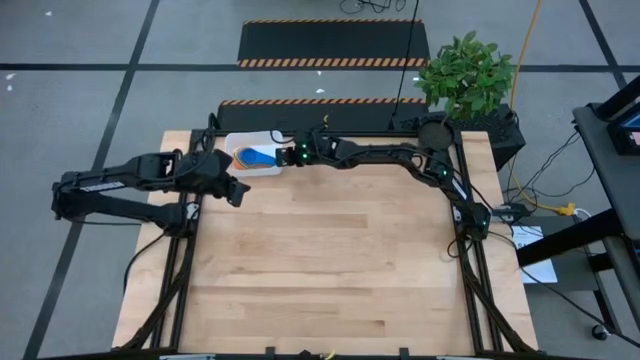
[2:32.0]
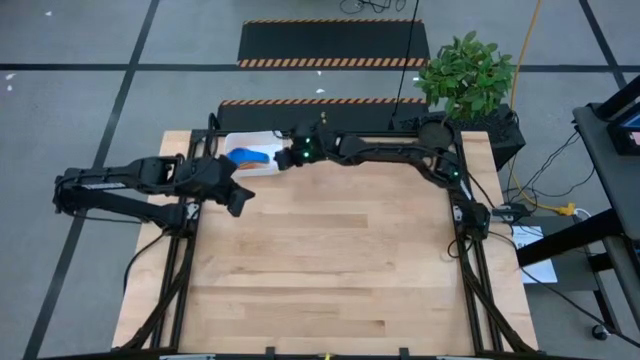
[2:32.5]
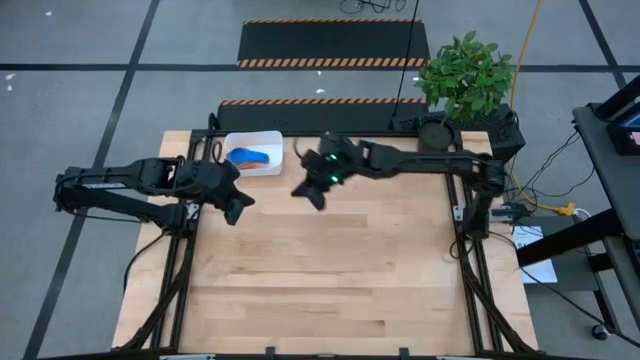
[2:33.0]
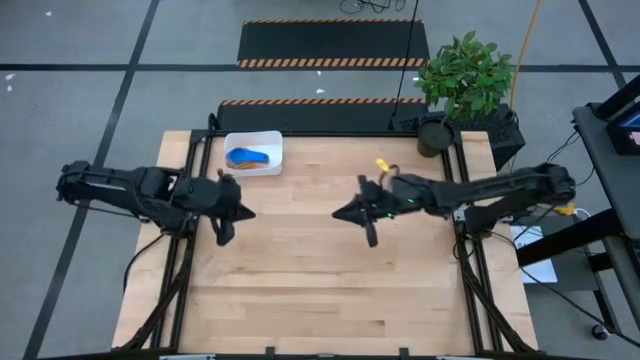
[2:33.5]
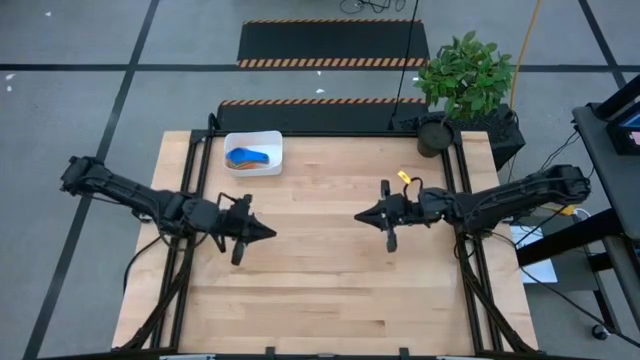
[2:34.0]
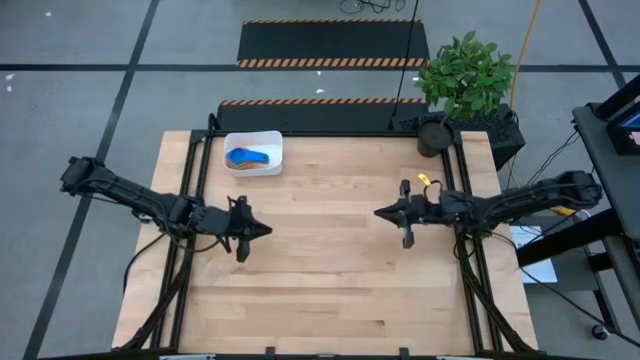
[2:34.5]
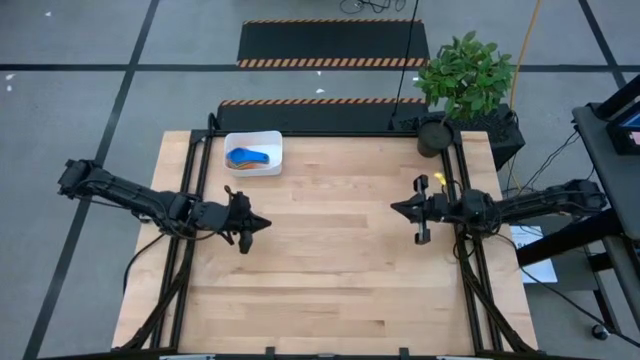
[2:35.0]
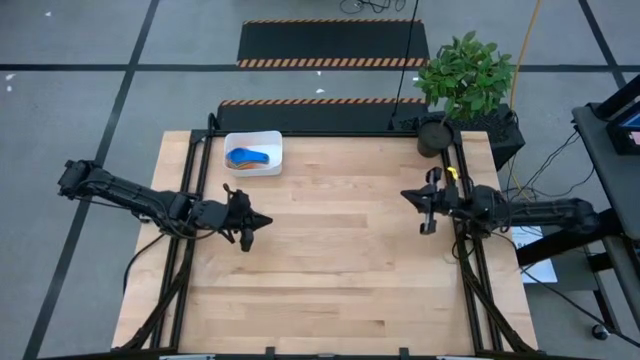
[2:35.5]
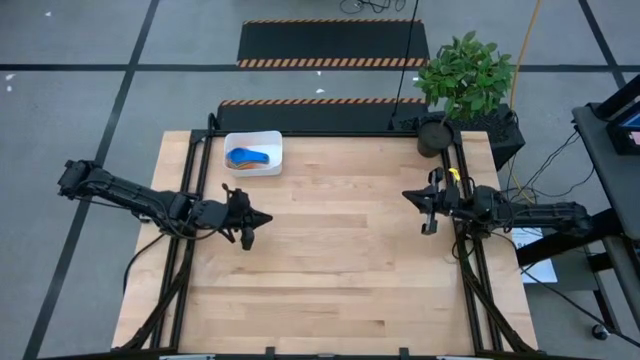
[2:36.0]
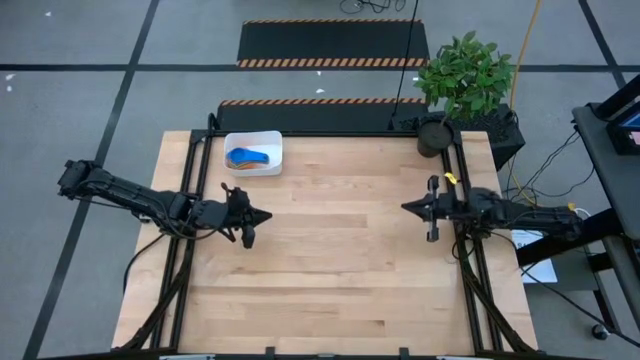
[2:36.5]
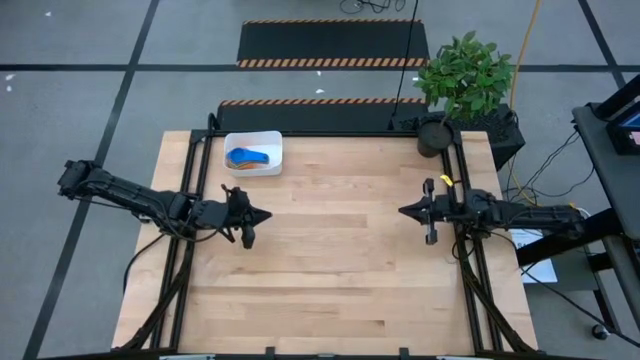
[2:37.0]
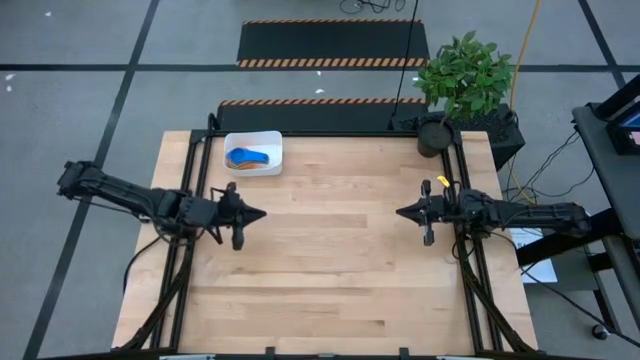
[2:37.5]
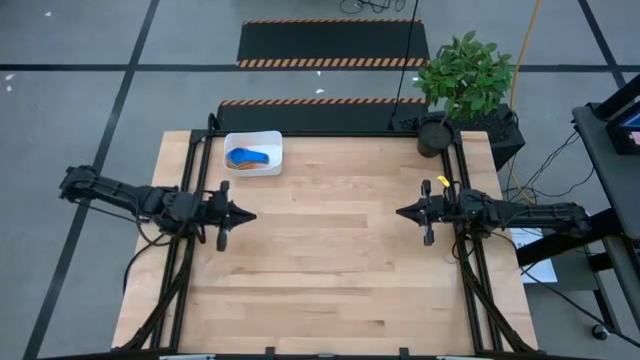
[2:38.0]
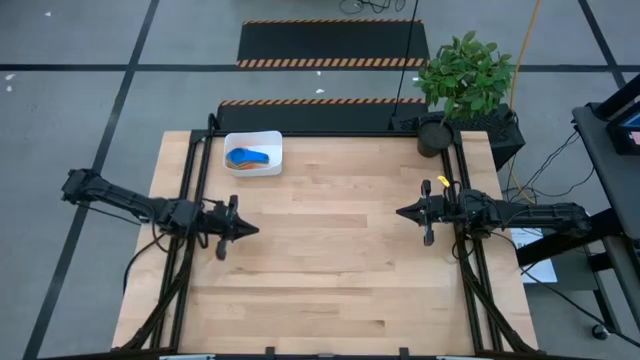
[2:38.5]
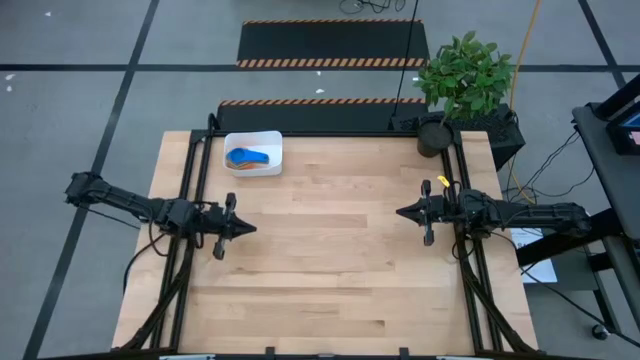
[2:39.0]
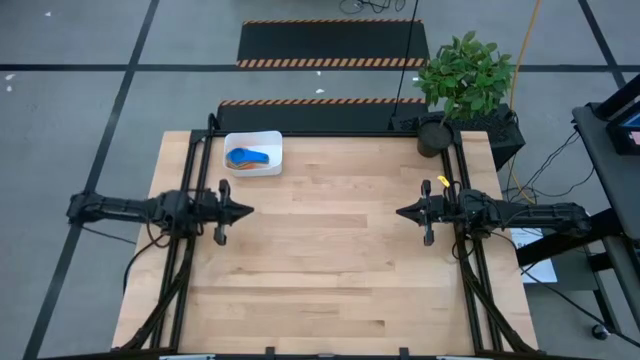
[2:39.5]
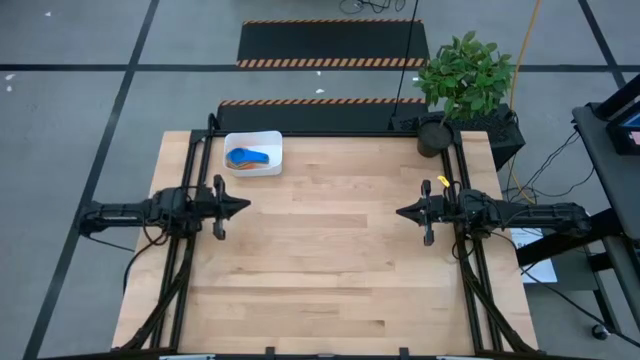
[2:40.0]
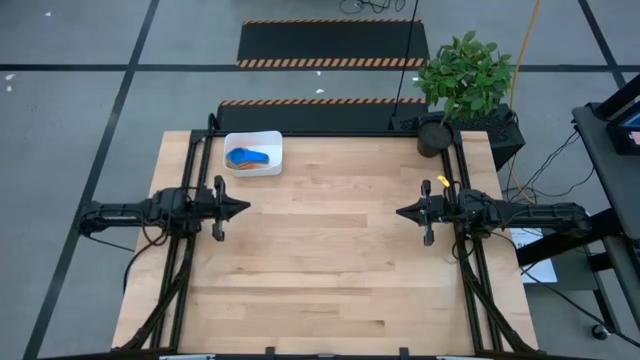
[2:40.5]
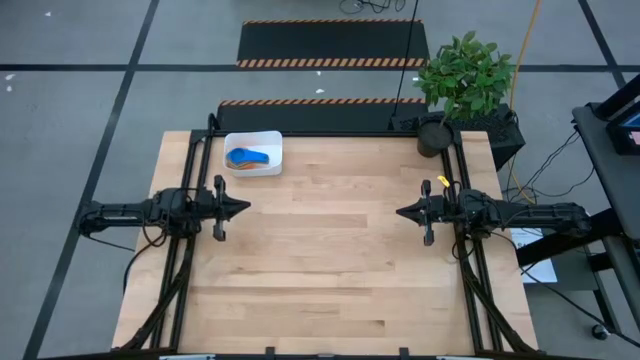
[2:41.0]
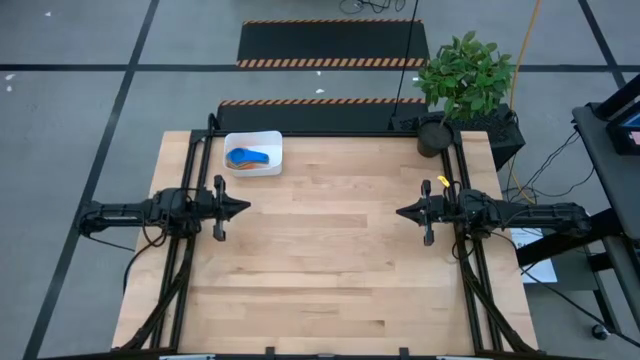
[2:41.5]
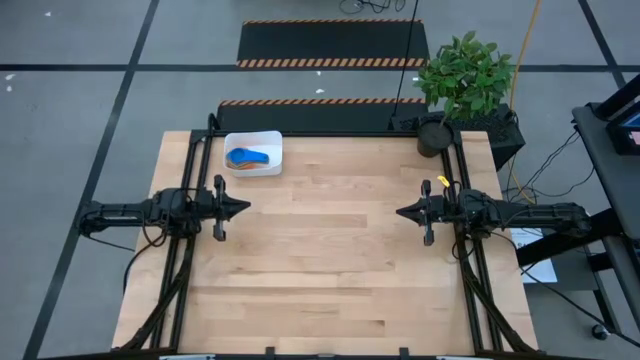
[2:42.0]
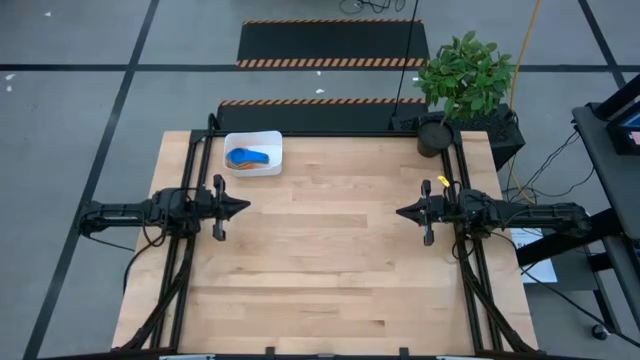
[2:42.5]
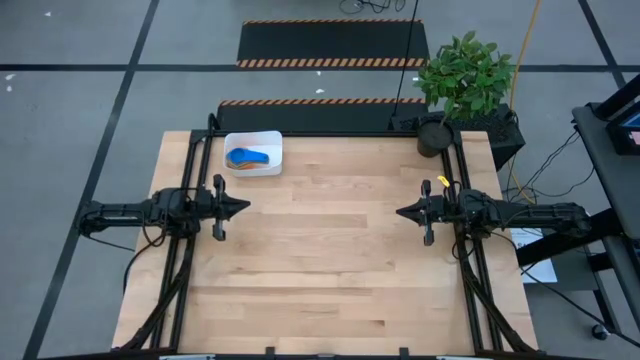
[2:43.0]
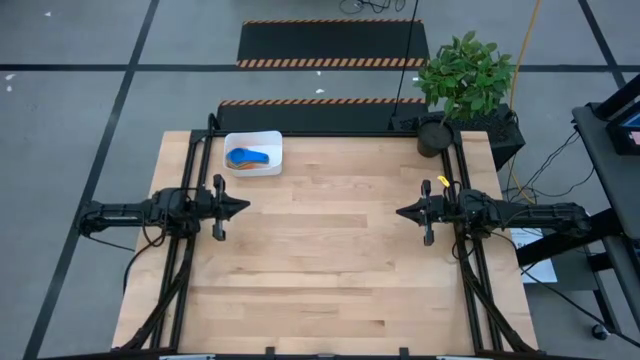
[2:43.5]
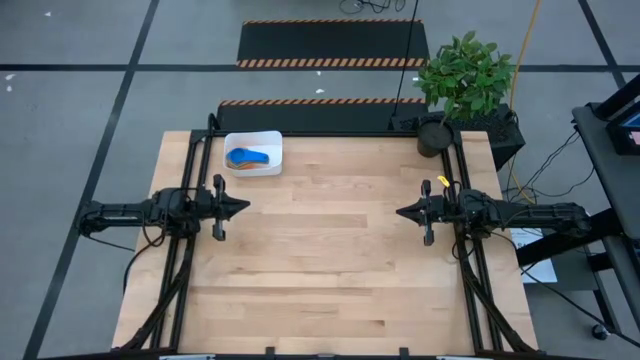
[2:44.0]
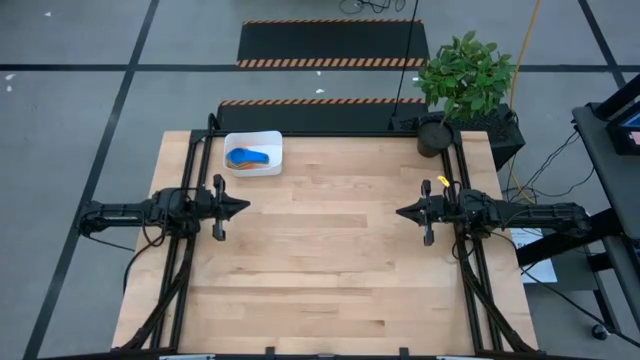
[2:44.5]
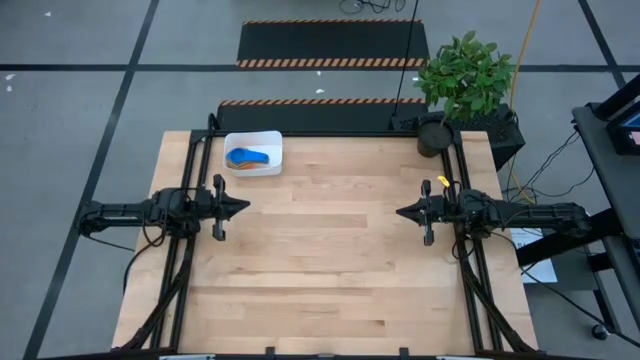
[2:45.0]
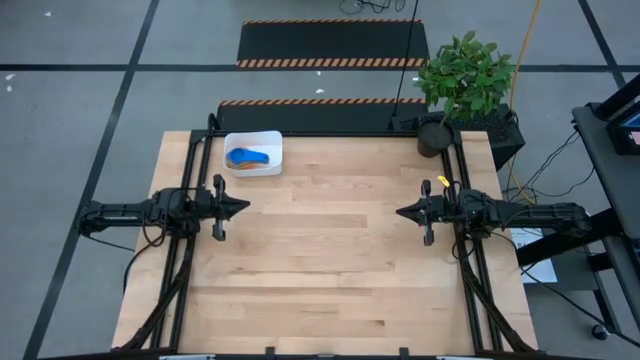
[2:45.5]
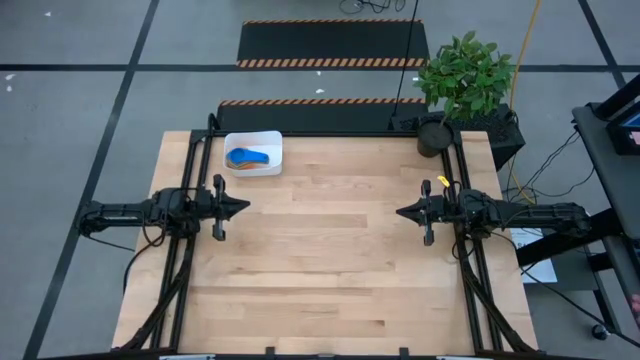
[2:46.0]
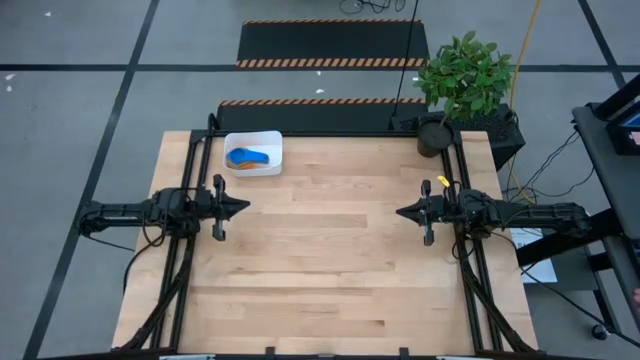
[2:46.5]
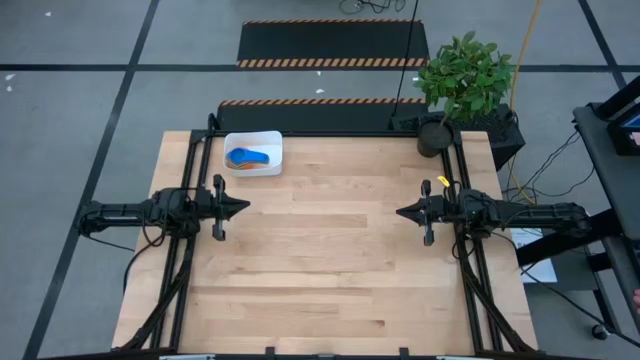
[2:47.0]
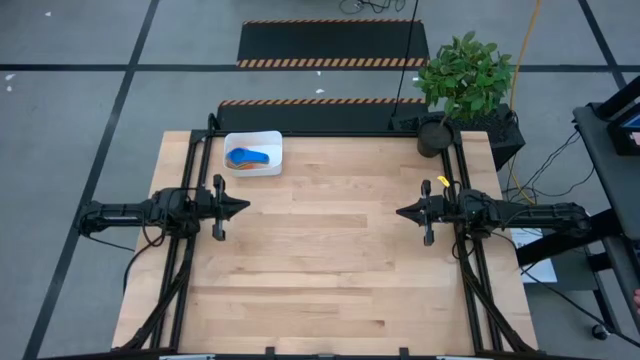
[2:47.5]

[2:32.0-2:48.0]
Task: Nest measuring cups in basket
Return to Home Position

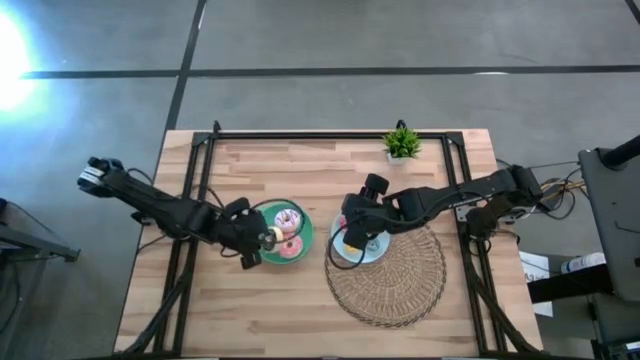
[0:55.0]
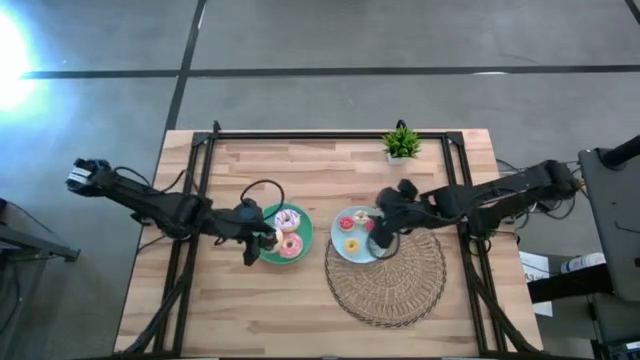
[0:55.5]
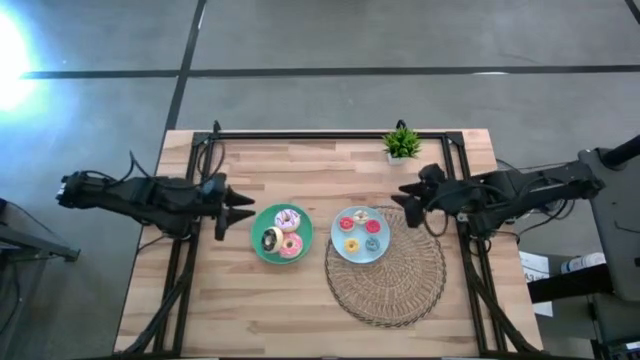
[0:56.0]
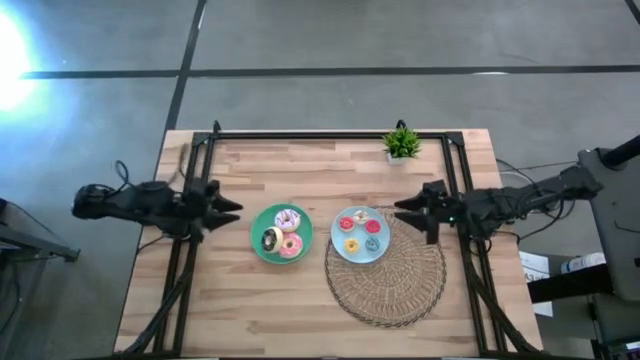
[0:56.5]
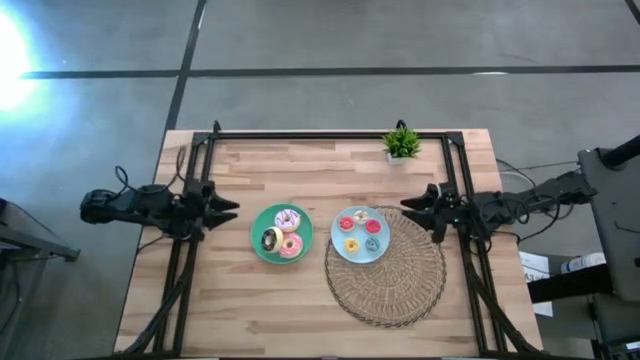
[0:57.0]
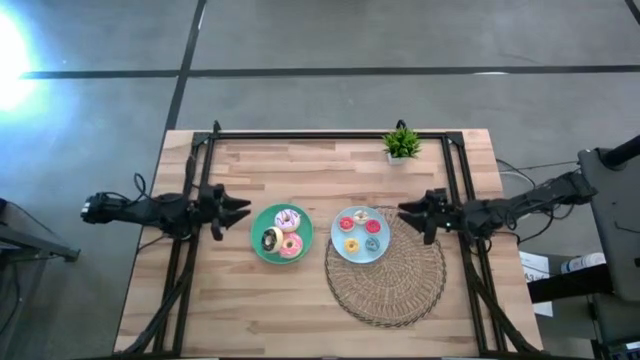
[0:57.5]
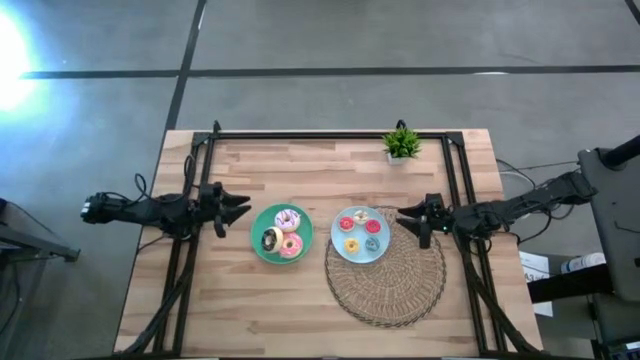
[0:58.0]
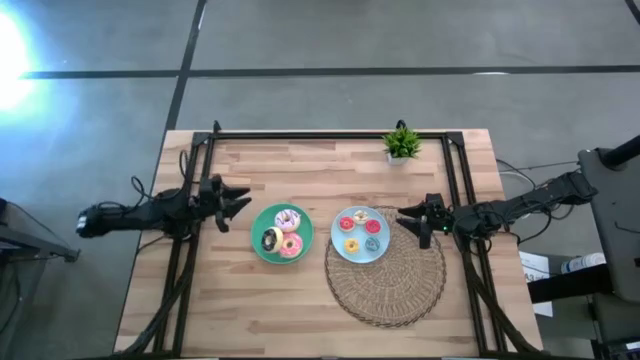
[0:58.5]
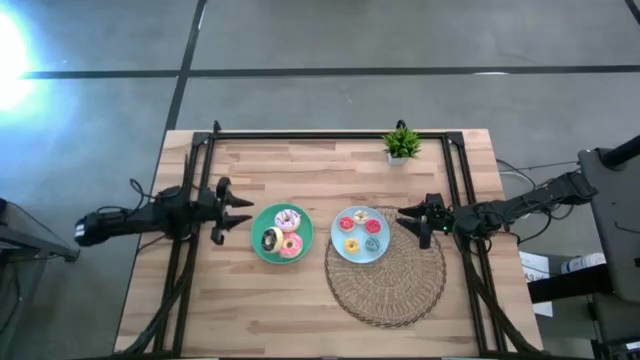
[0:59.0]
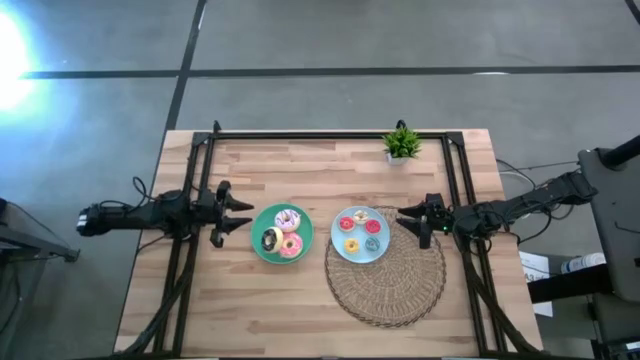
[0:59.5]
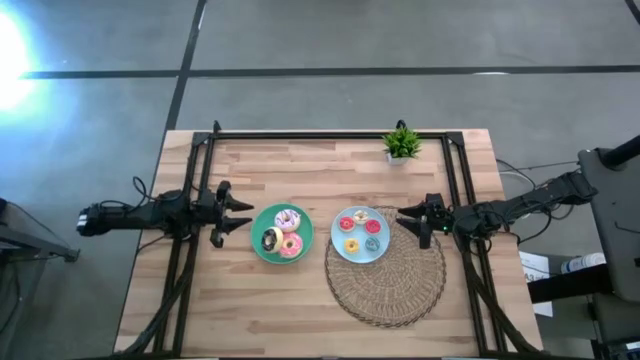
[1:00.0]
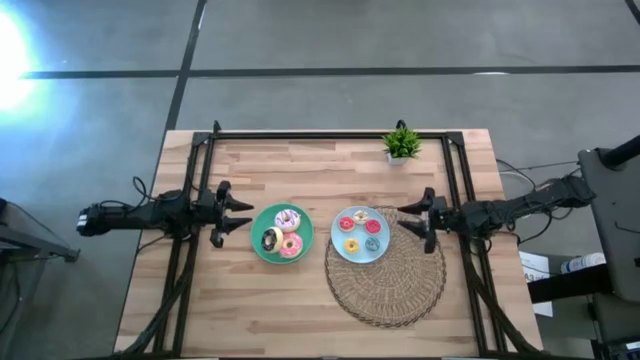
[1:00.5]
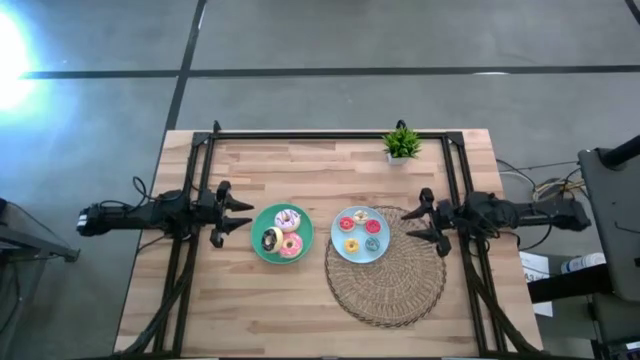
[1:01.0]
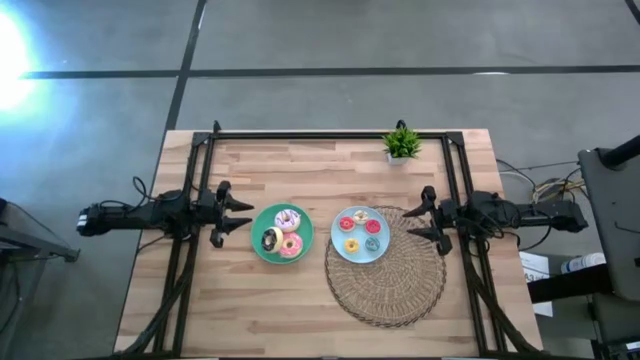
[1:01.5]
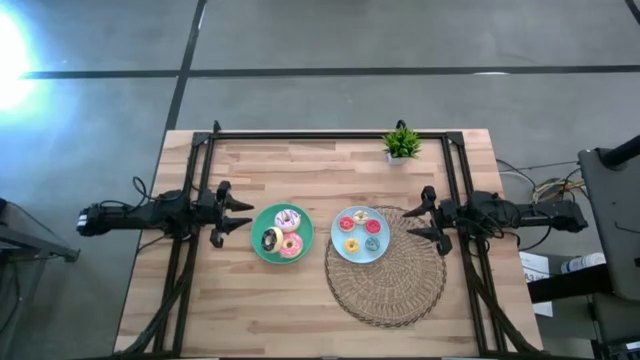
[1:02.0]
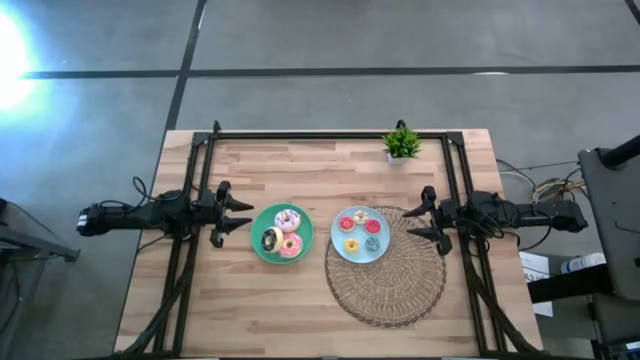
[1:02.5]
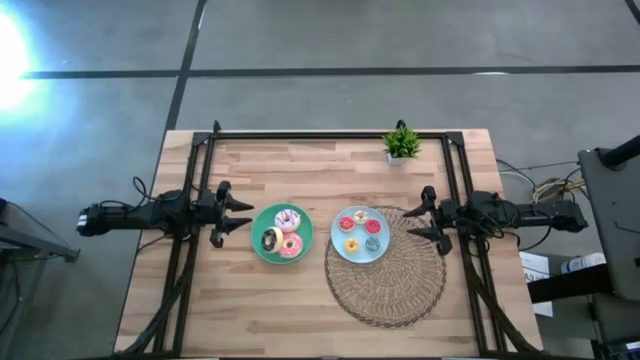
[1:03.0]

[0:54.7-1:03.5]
Task: Pick & Place donuts
Return to Home Position
